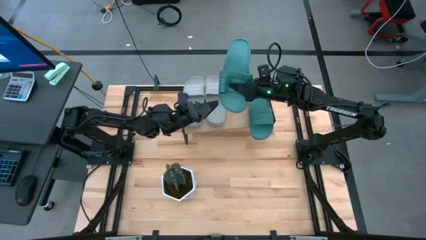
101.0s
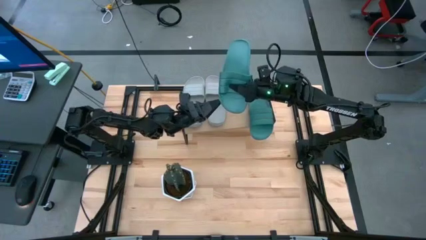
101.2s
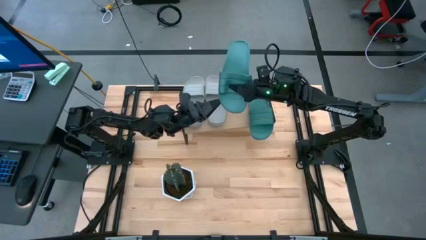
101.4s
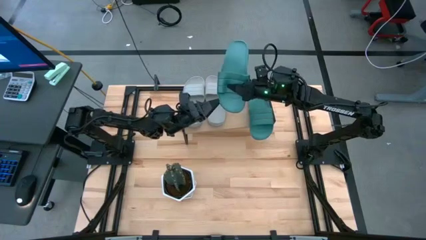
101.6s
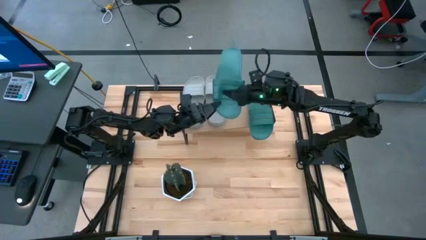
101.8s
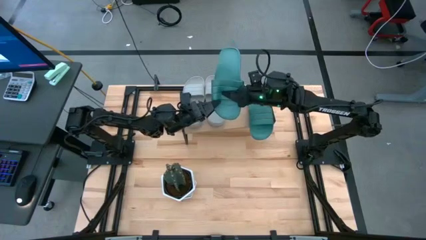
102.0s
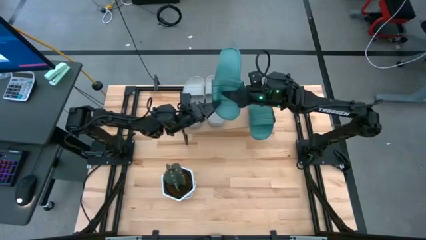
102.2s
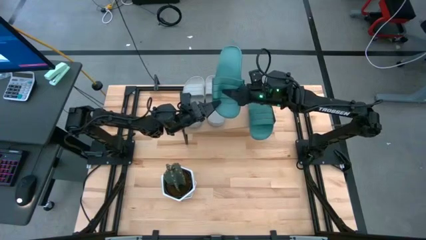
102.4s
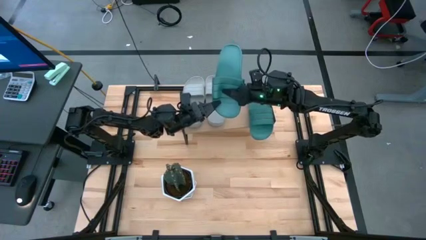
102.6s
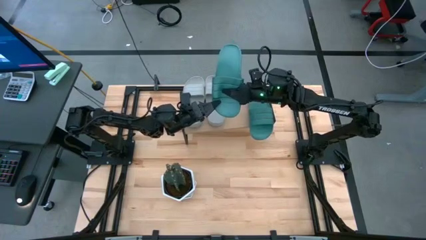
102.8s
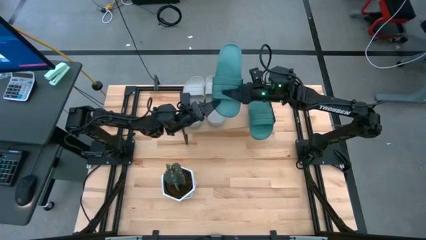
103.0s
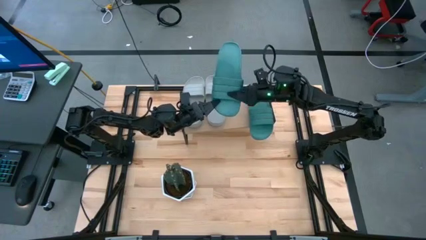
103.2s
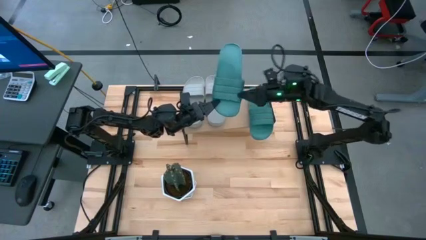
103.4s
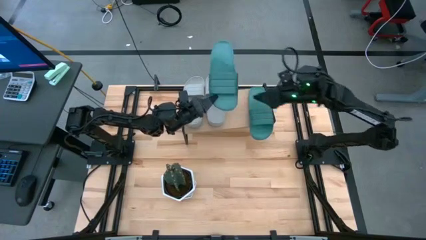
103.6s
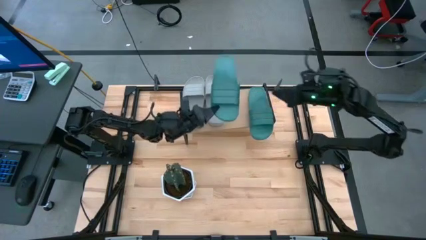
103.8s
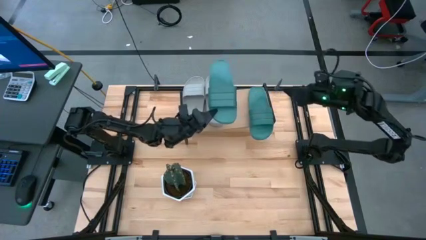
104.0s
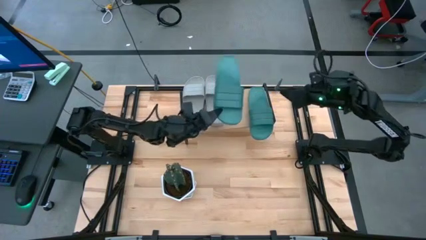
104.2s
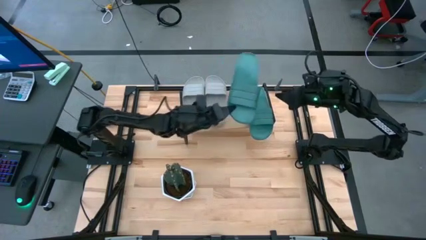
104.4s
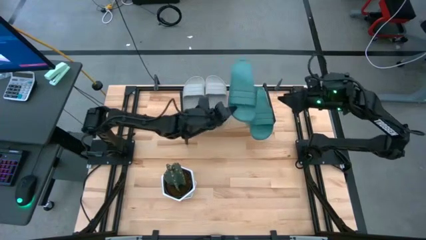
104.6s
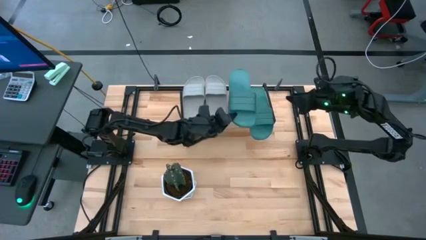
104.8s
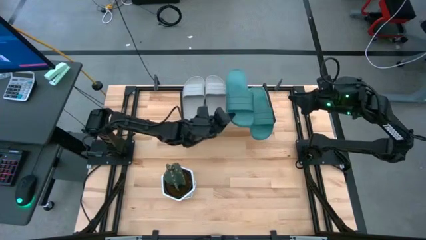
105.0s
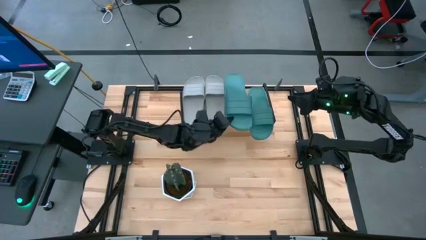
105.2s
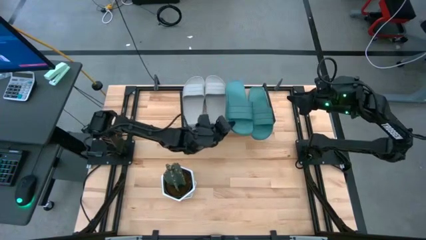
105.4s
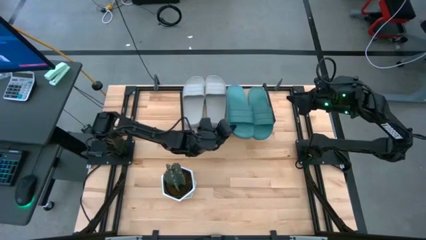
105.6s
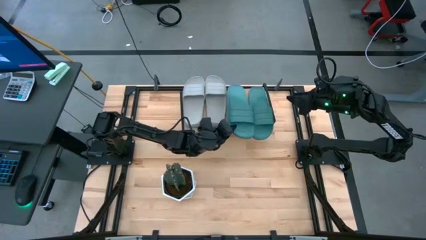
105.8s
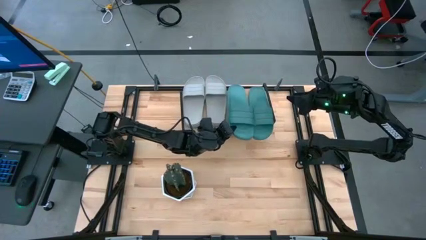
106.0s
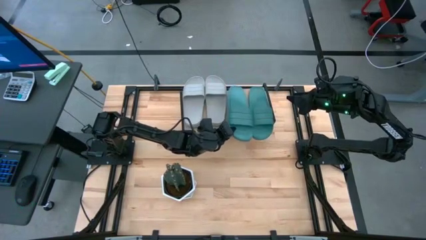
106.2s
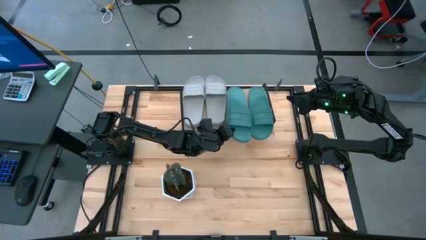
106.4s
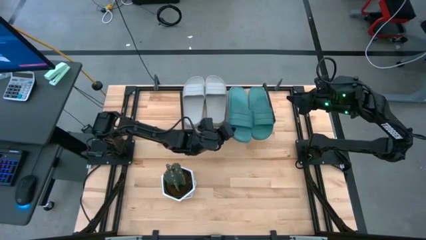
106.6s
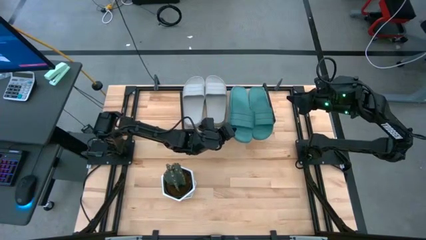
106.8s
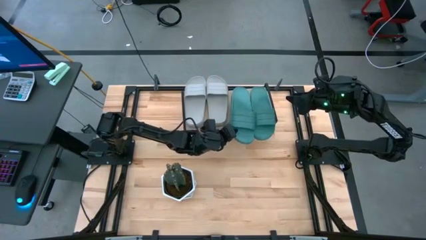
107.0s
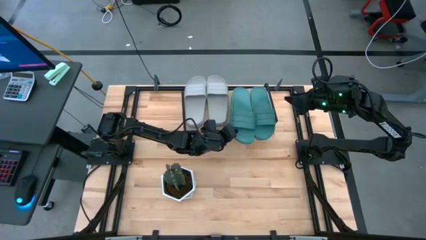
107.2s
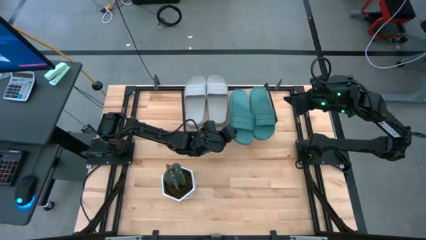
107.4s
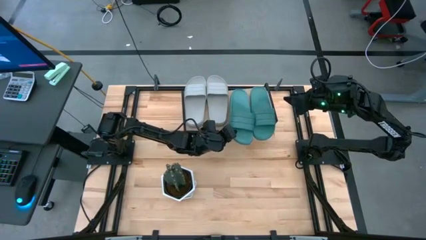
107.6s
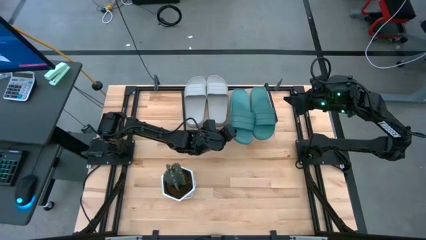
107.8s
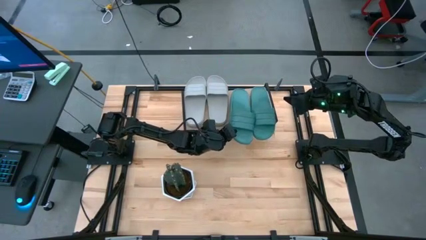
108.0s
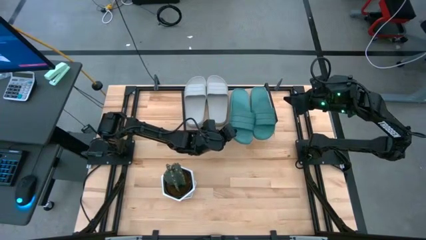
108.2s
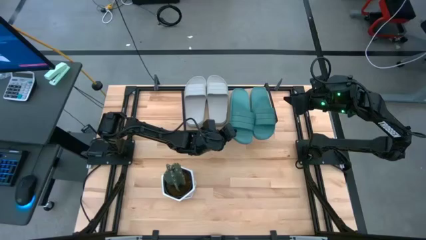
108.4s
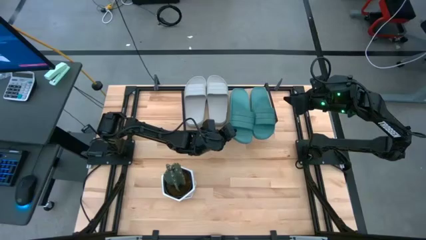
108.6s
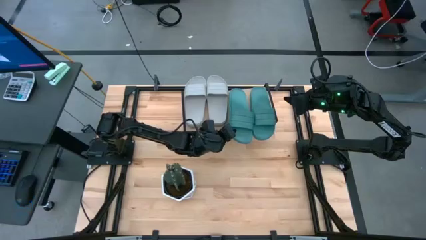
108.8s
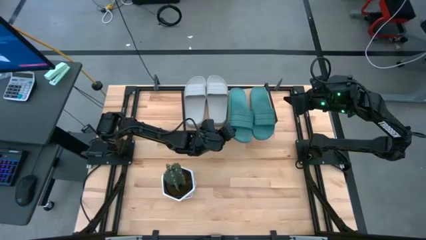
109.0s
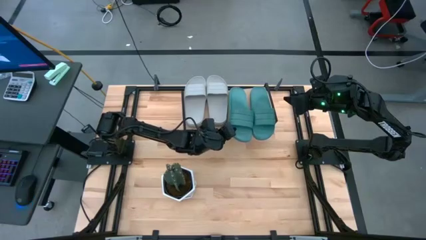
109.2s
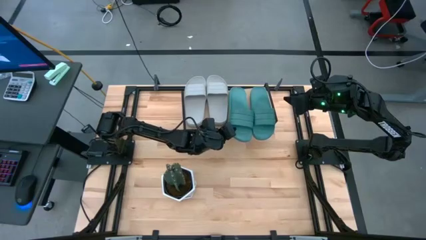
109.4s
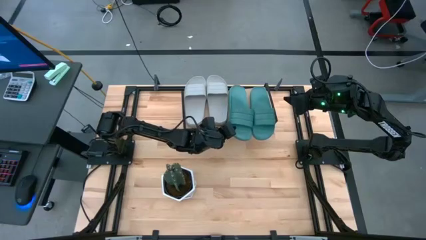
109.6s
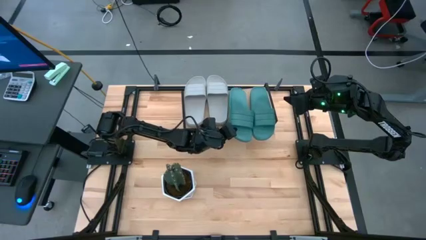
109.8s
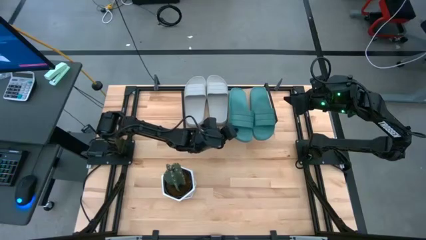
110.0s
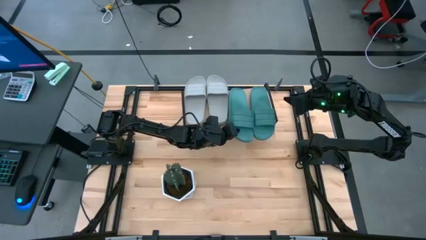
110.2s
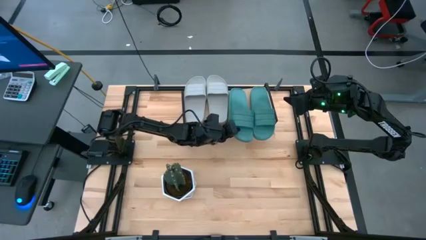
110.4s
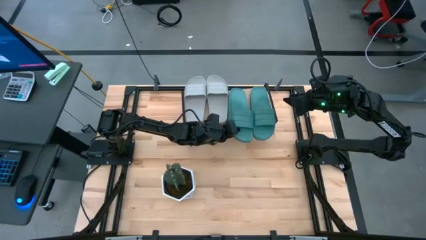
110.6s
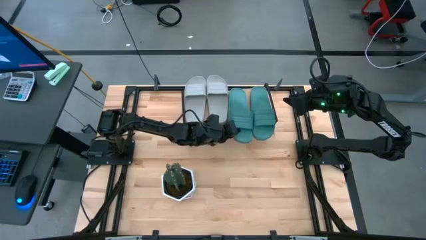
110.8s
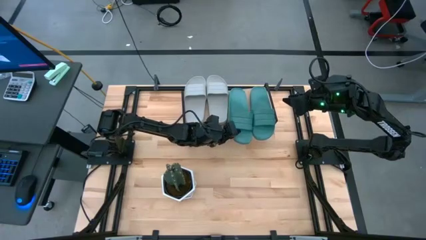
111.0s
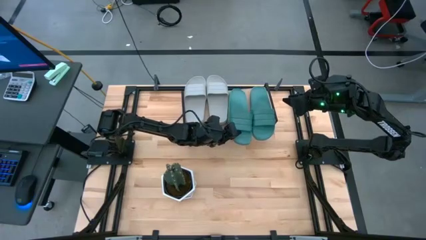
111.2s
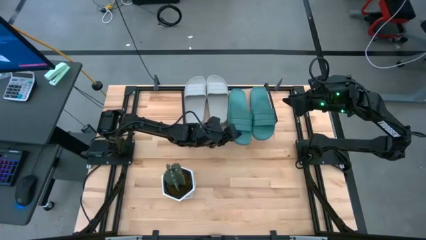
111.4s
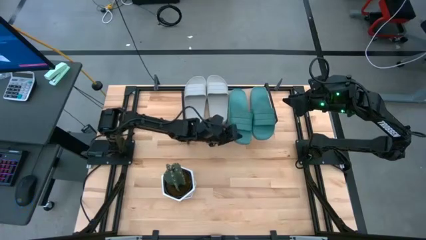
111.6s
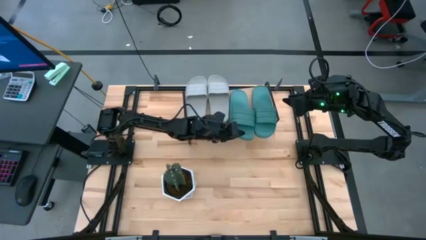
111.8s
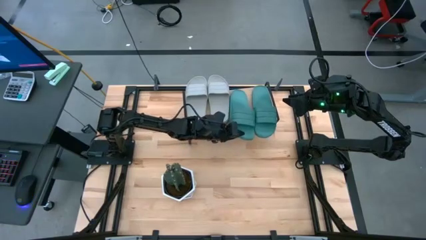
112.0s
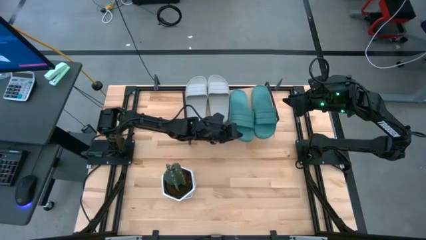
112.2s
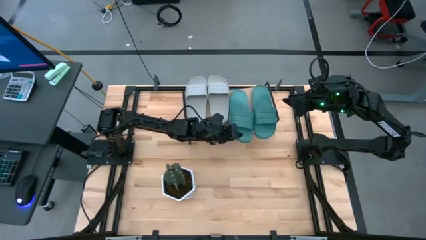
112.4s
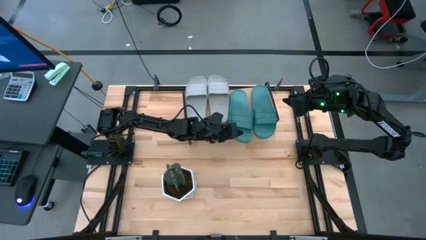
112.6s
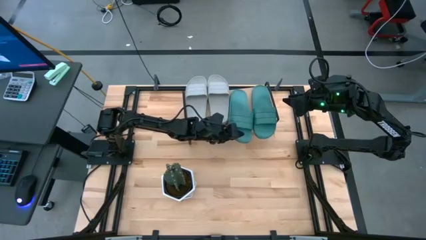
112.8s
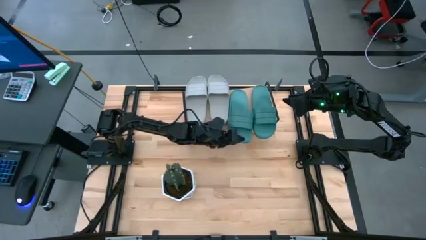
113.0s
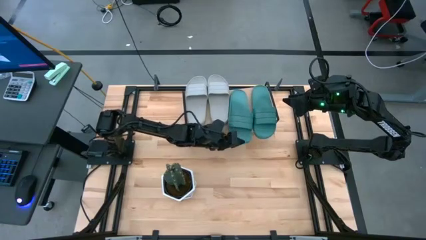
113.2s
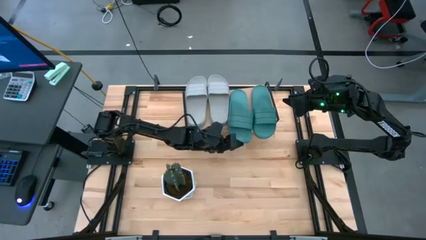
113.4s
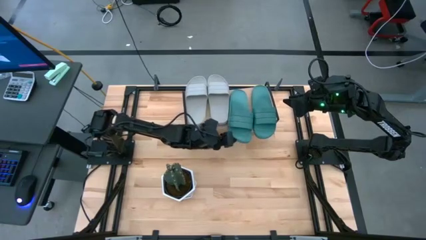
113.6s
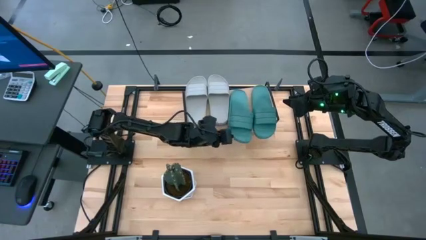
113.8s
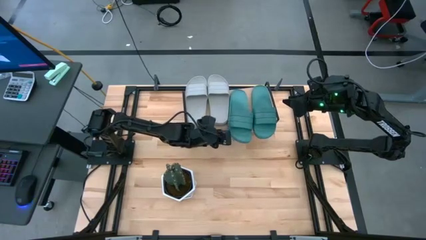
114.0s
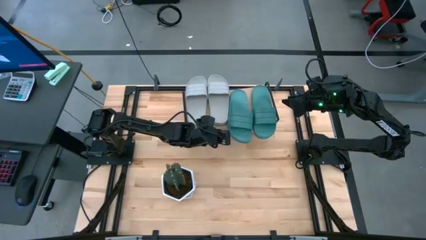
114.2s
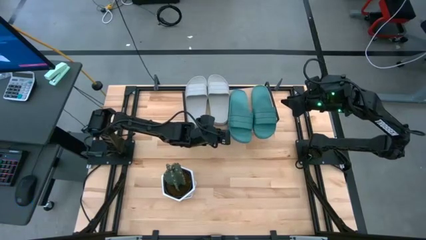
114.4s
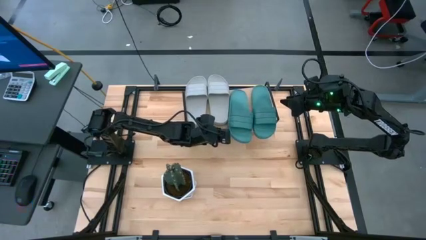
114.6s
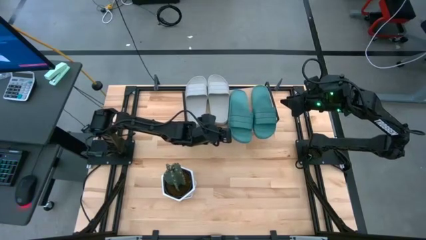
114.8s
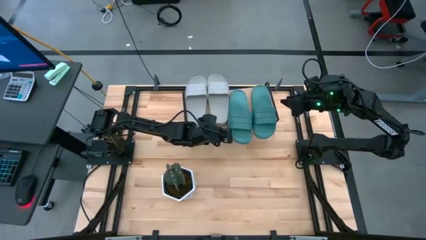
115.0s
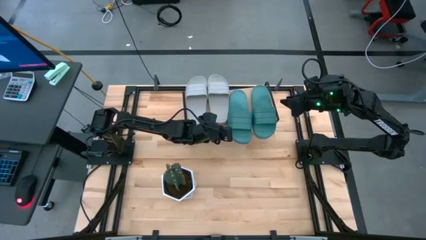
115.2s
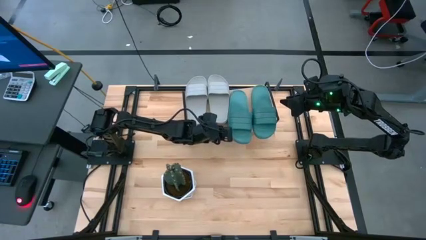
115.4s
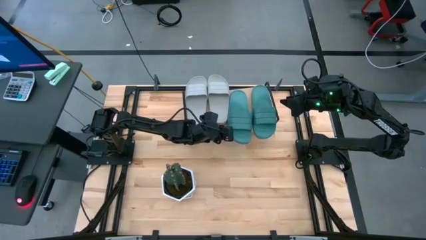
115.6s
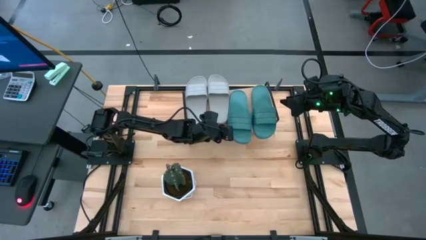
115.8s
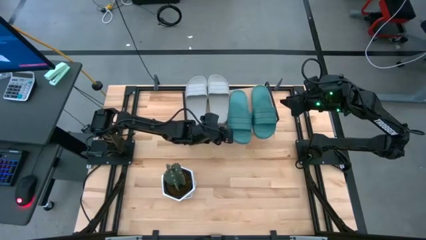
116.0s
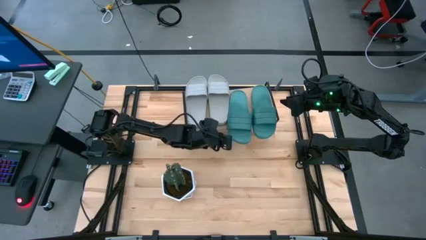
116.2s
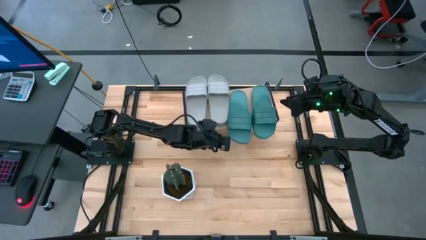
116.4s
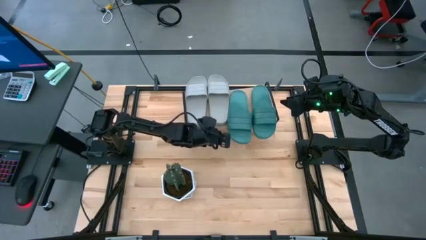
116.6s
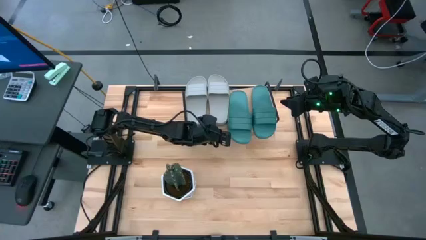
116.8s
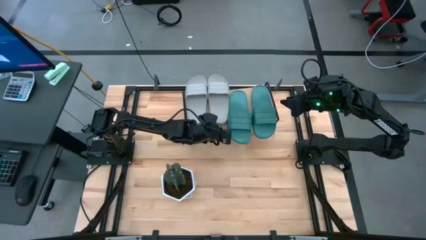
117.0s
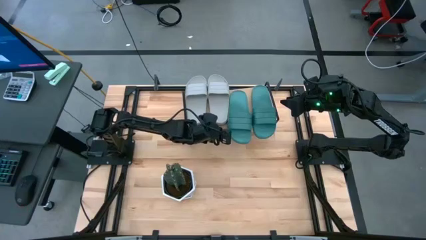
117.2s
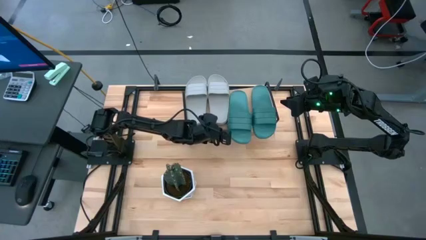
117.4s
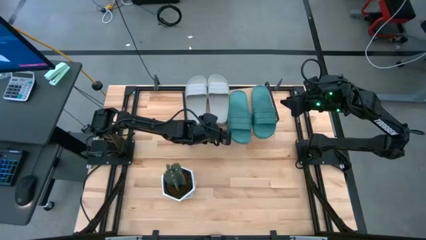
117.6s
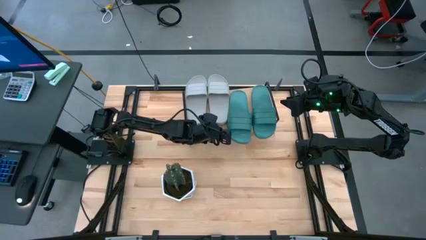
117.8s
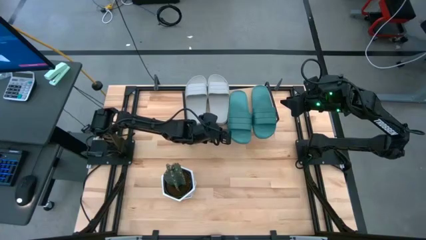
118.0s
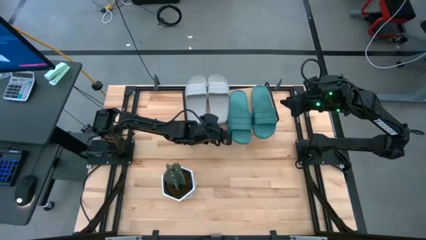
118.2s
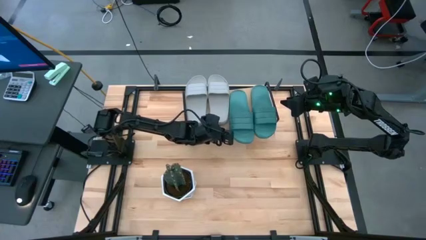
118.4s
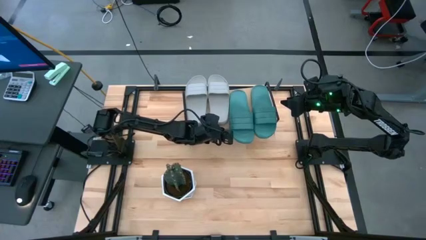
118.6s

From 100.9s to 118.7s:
Task: Pick and place slides into the shelf
Put the green slides on the shelf
